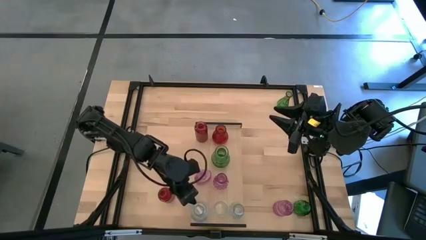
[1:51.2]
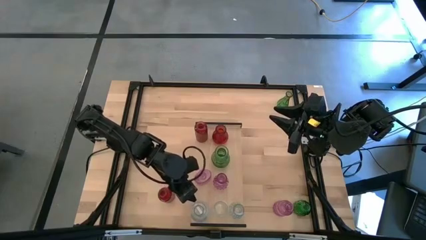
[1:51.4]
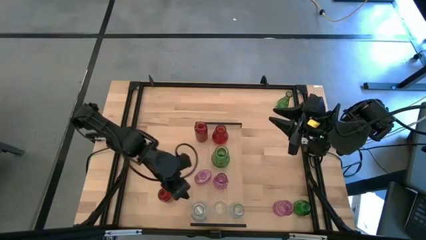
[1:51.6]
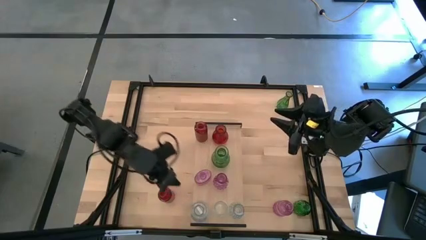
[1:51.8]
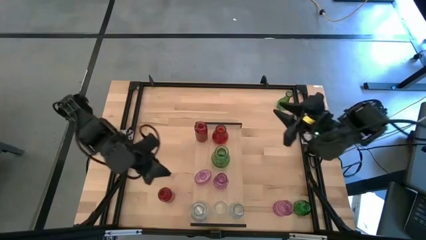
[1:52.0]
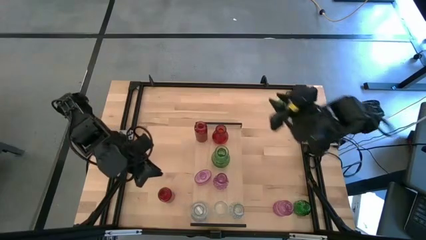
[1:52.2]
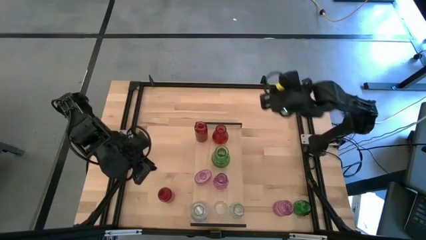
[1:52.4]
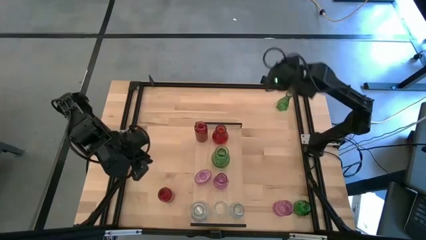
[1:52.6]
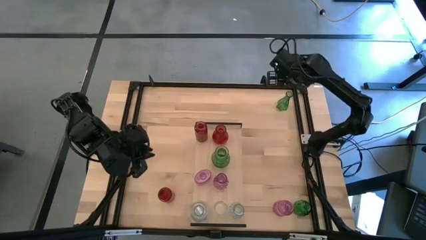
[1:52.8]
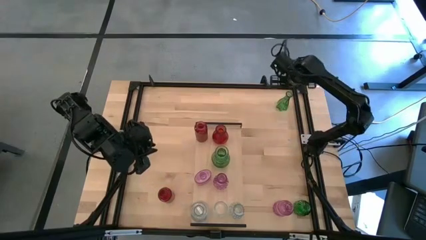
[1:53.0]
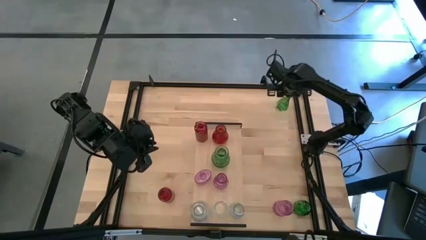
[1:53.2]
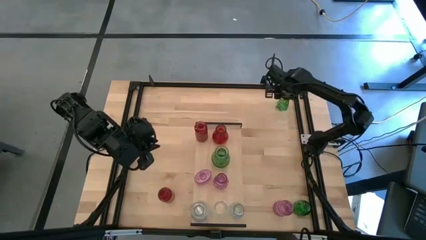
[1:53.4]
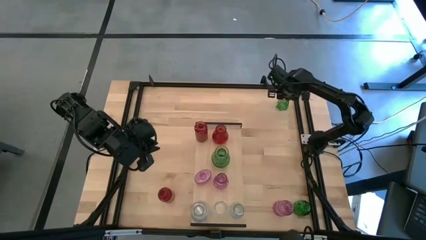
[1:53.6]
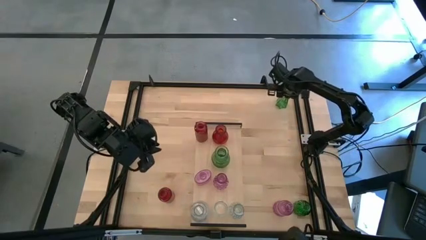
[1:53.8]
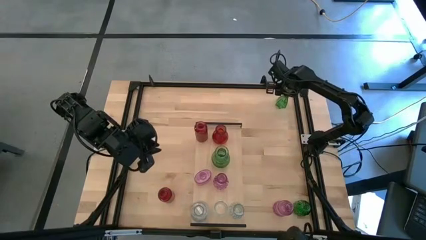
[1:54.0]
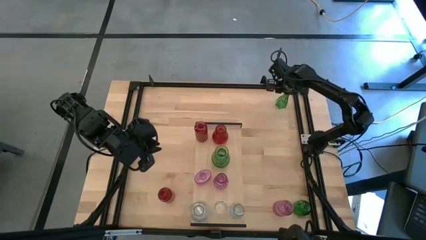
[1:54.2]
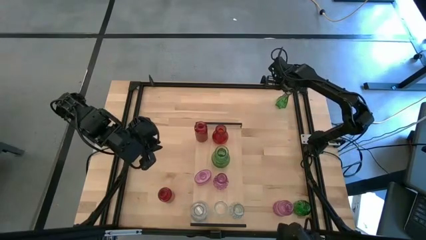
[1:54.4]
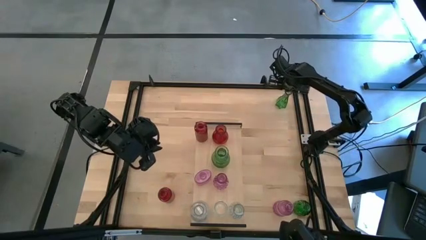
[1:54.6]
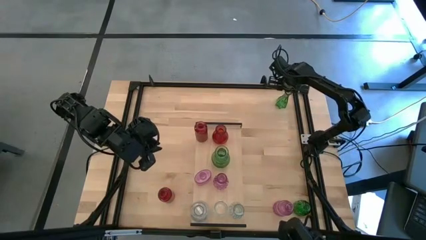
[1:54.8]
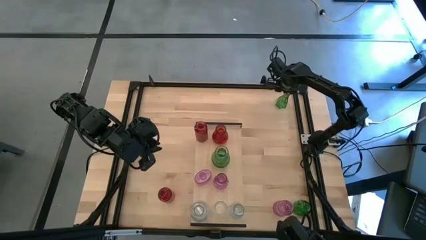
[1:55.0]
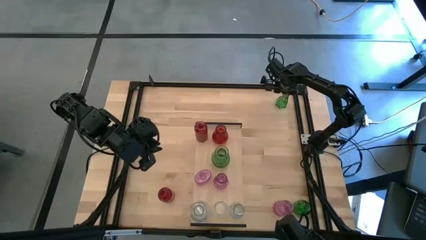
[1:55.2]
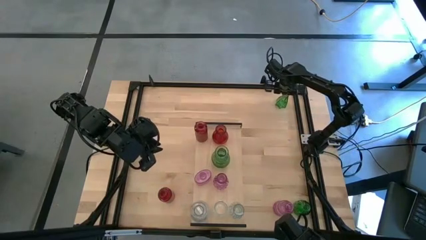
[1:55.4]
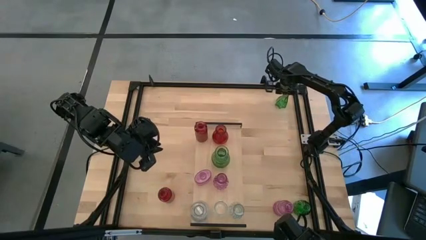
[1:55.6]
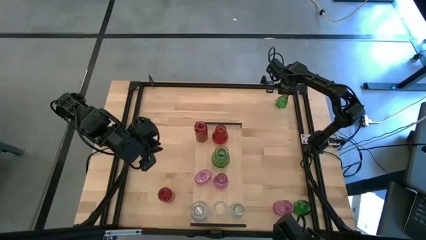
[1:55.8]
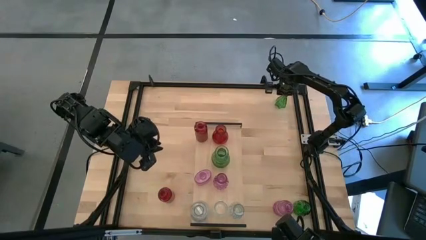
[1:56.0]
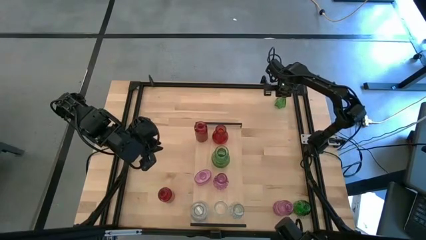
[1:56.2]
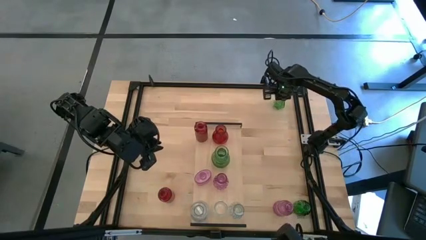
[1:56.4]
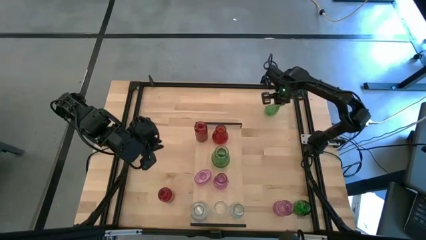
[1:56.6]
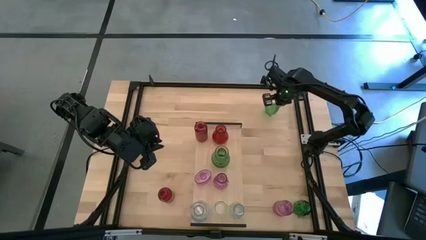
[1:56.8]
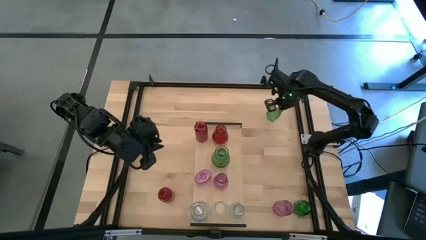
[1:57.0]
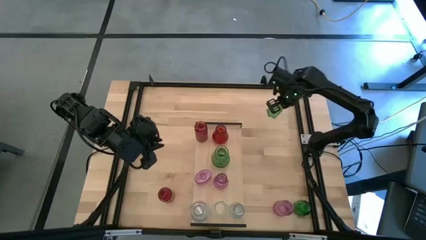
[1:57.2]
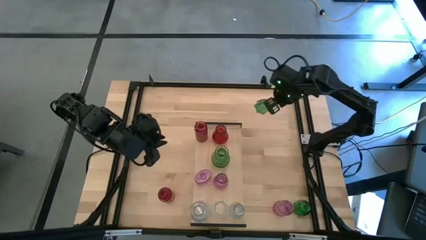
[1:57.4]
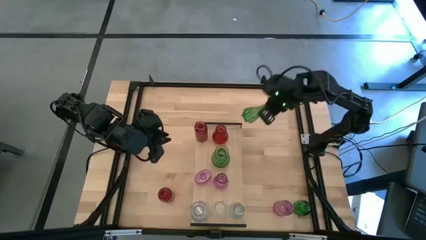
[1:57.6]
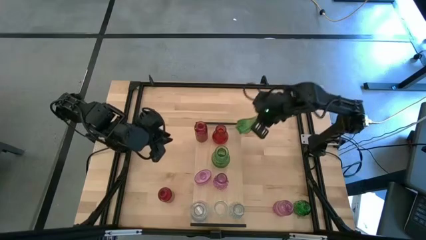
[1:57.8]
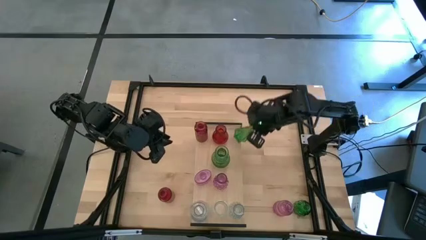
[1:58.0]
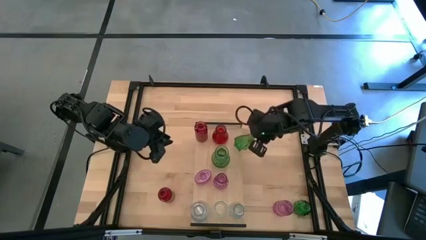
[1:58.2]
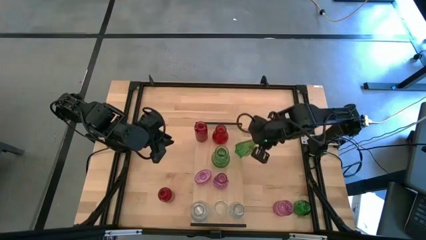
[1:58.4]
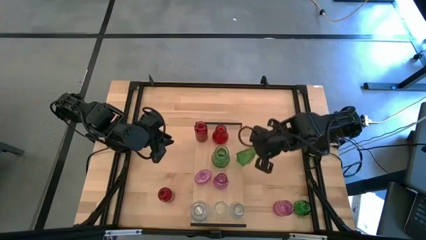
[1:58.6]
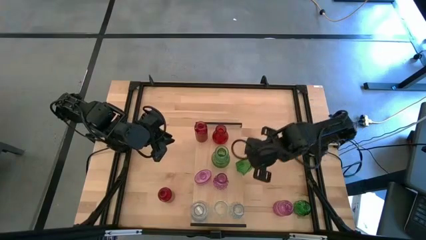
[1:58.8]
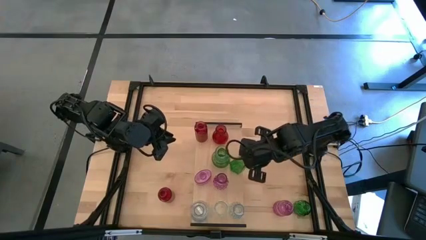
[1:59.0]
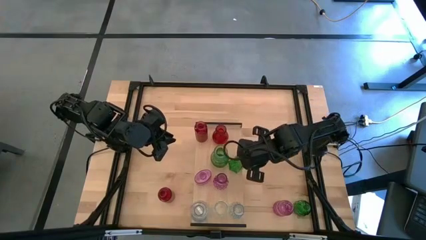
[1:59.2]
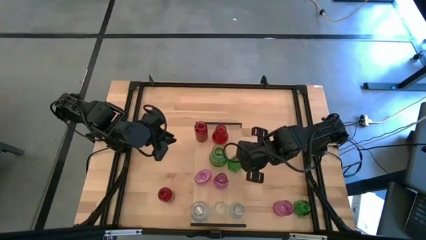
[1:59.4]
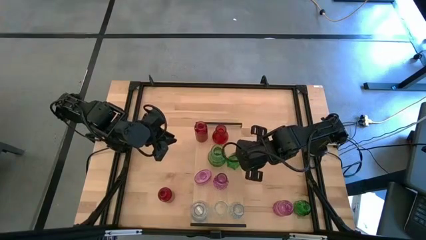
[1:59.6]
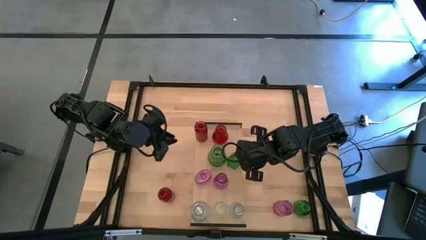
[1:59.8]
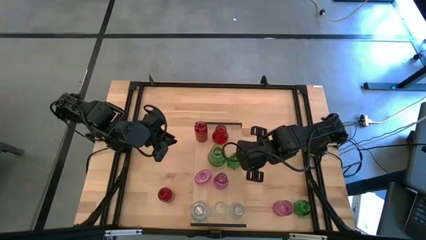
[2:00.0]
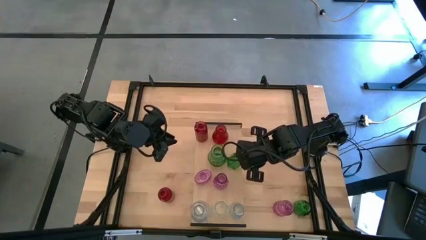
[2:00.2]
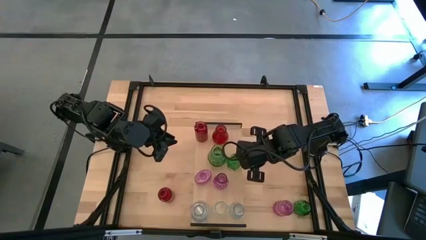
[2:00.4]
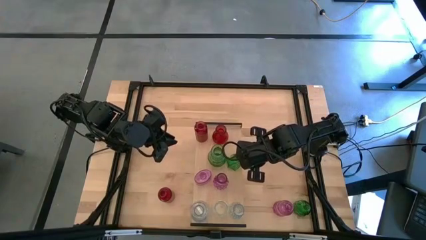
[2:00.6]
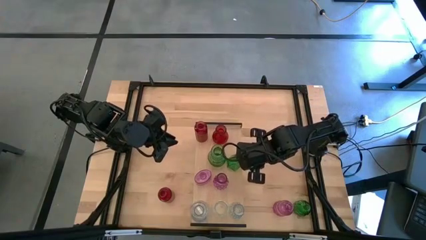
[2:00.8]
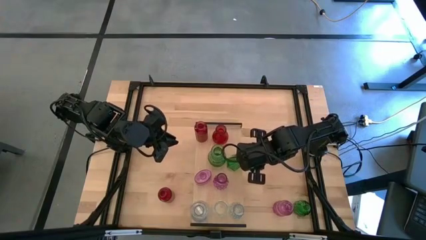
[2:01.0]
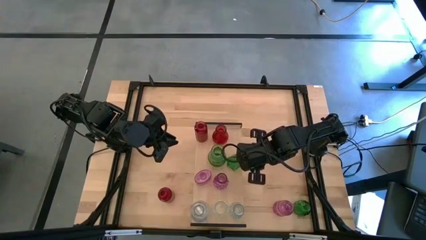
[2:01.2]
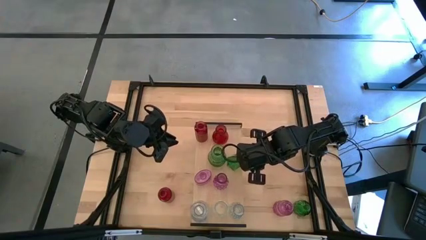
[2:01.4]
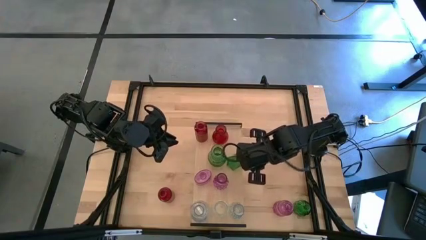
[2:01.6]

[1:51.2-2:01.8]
Task: sort vases onto shelf
Put the top green vase on the shelf aligned with the other green vase

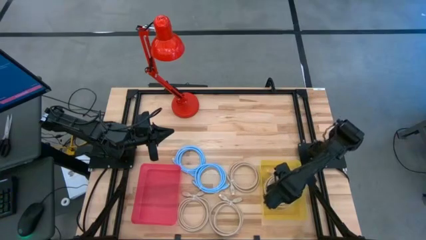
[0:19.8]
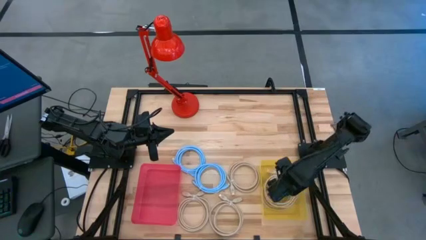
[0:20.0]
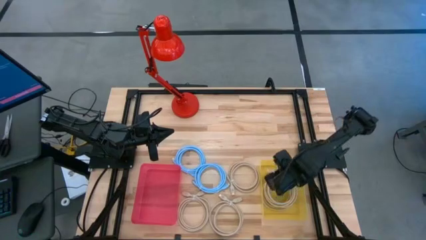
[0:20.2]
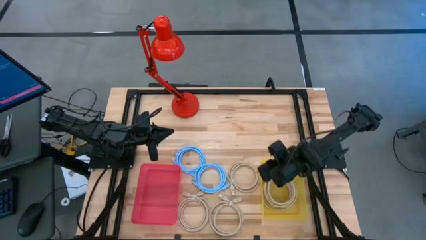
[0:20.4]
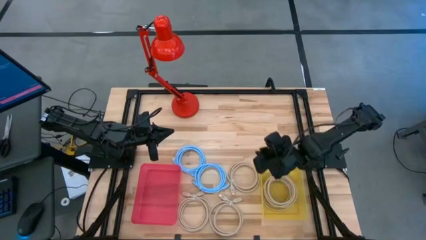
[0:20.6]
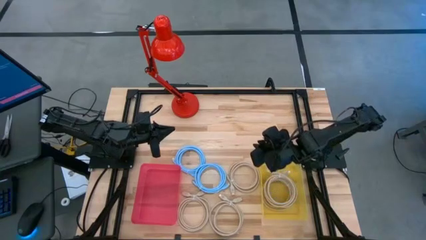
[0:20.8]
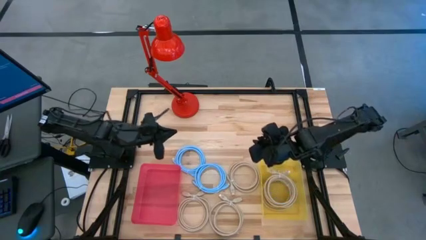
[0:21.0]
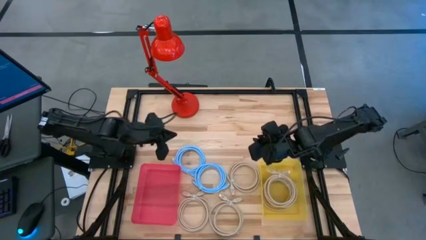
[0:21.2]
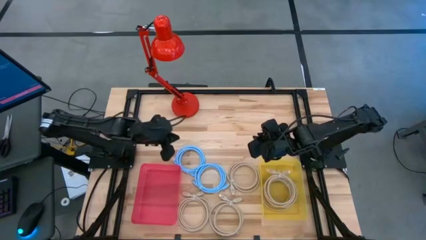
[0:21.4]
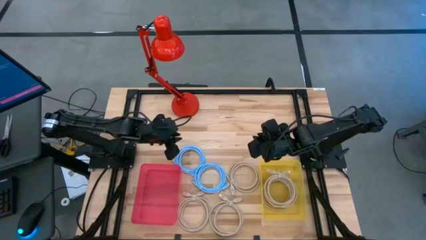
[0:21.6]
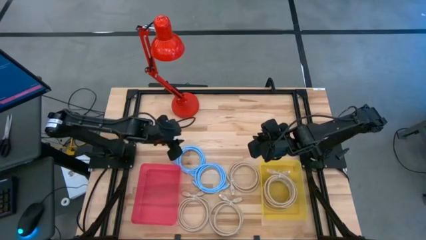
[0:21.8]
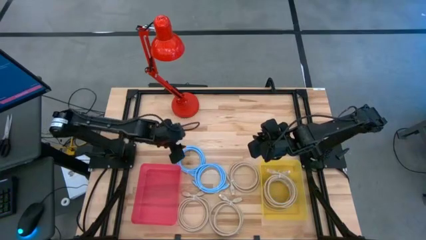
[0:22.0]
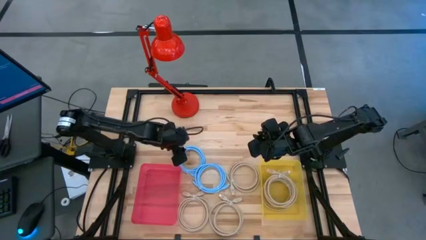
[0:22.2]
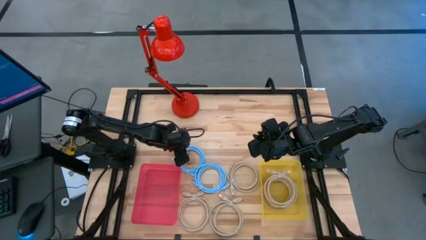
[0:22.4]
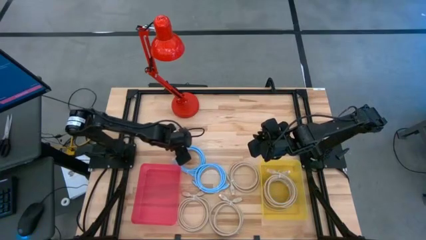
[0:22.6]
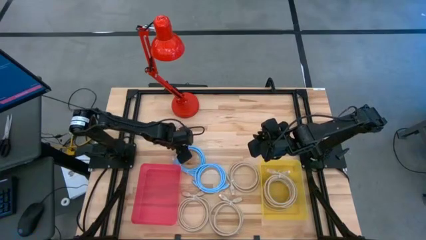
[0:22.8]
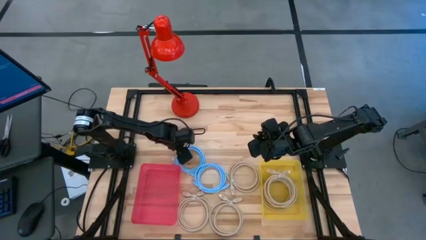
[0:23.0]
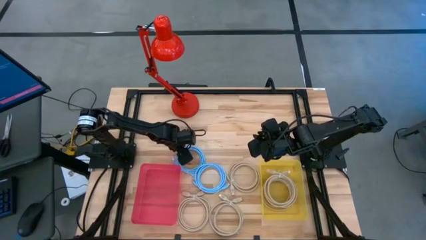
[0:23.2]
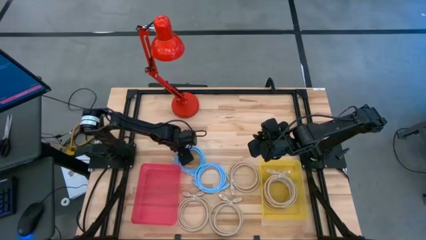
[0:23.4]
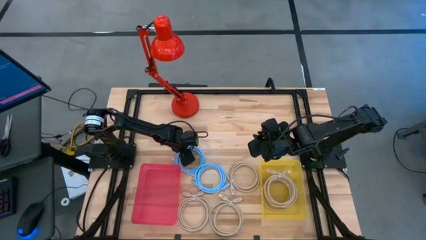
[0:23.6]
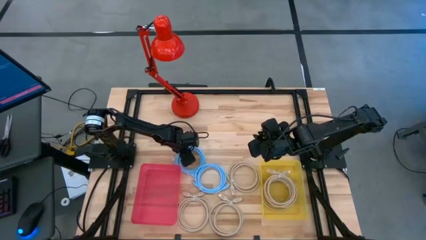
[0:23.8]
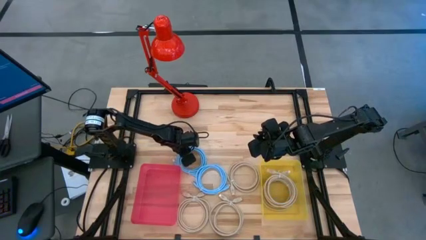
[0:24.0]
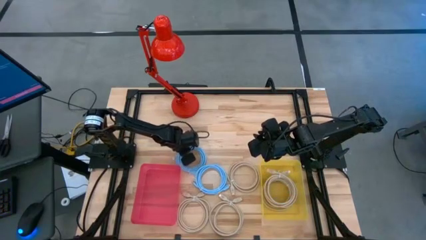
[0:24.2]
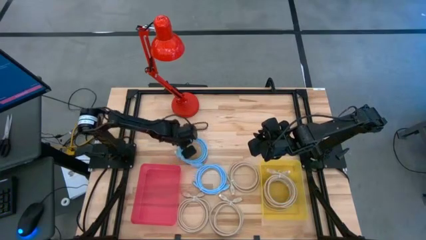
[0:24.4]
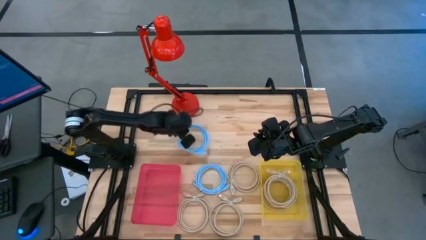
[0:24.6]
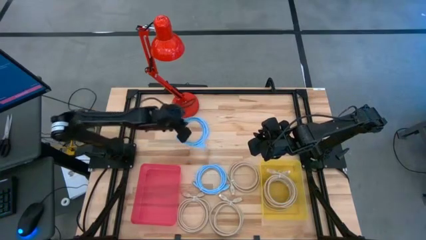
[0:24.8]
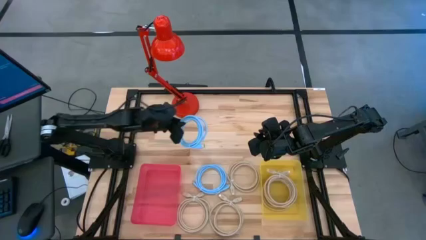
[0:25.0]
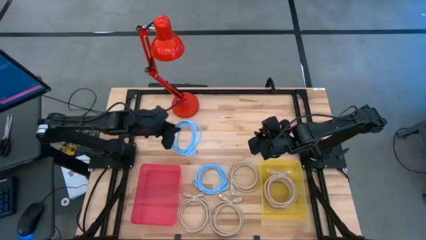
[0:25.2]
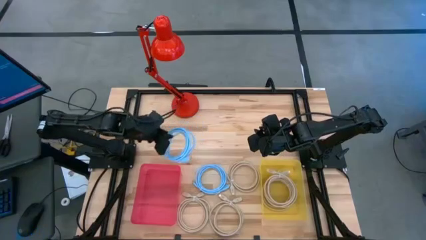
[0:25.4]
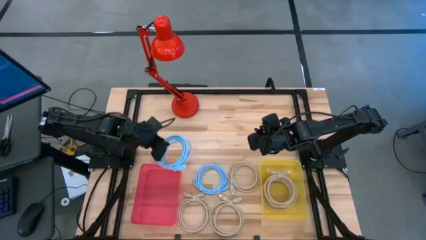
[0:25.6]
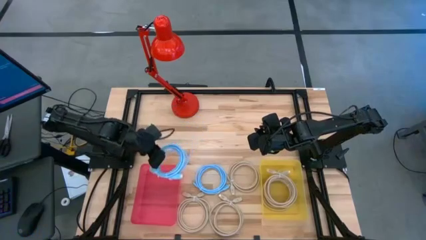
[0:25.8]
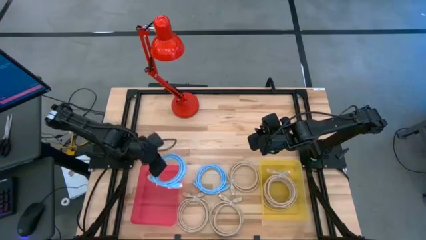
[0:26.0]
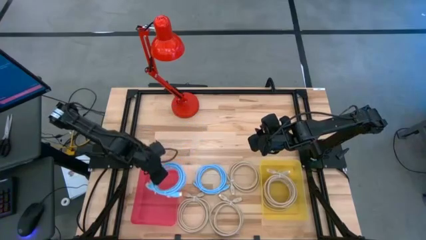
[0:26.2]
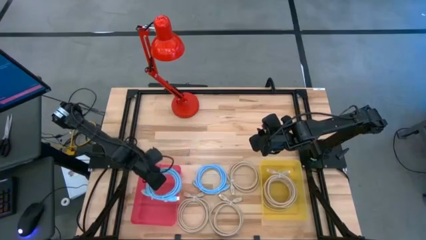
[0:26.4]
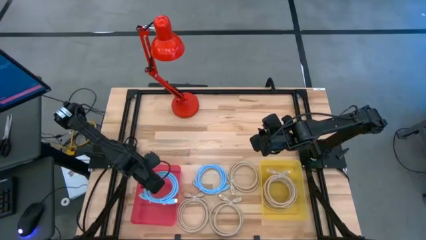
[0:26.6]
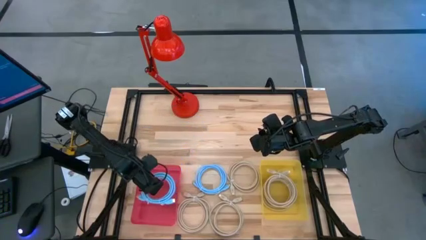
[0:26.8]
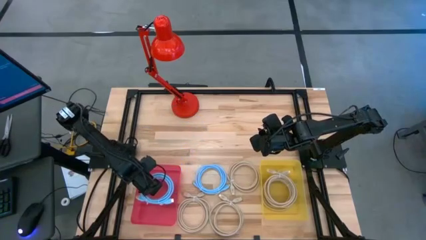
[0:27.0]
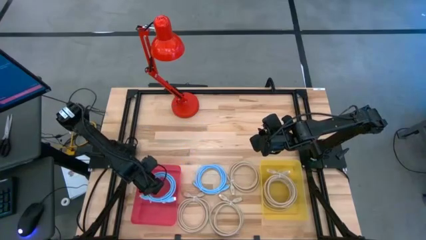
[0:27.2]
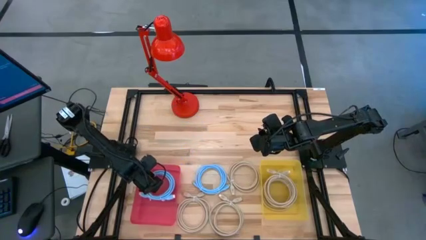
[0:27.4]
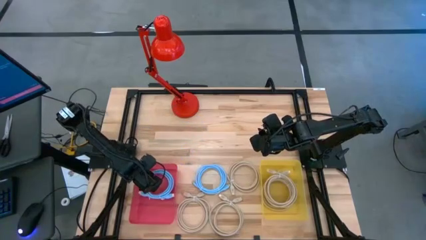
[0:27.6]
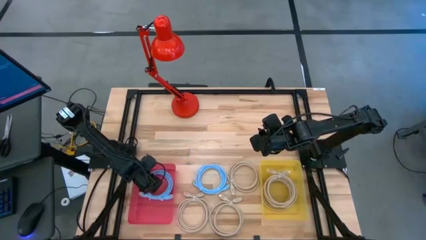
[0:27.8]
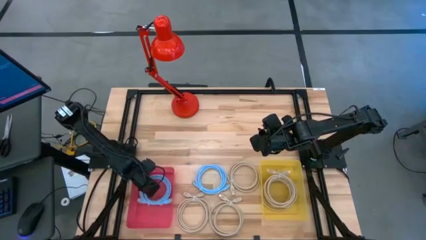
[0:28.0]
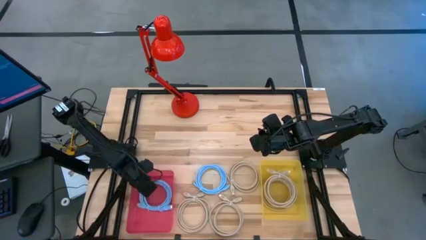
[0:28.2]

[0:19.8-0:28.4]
Task: Pick & Place USB Port
Put the blue charger cable into the red bin
